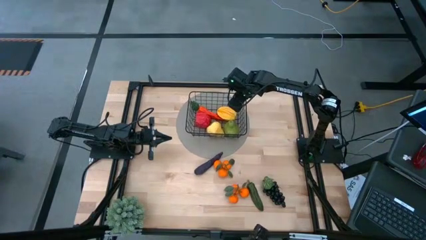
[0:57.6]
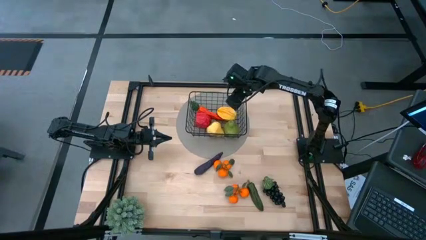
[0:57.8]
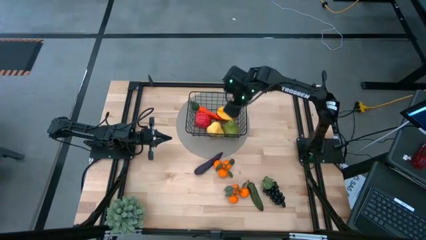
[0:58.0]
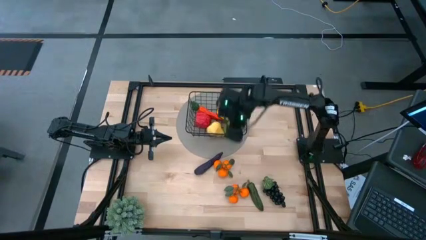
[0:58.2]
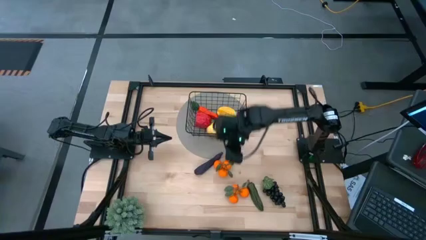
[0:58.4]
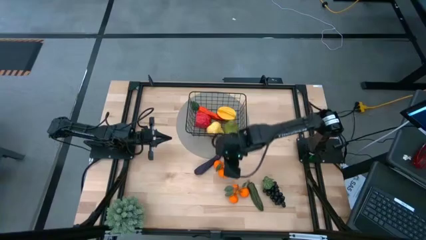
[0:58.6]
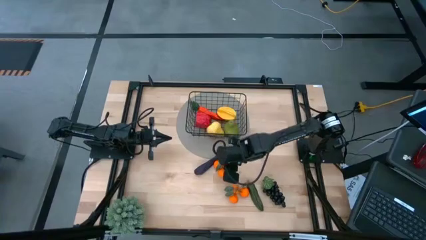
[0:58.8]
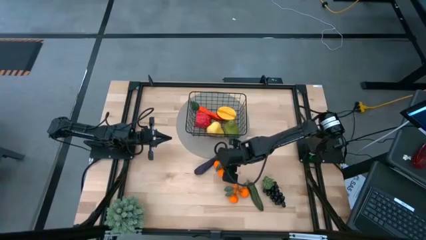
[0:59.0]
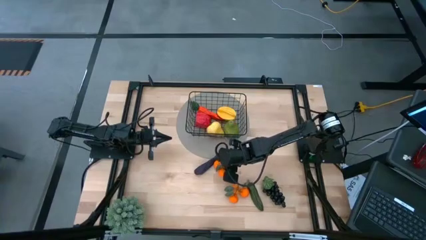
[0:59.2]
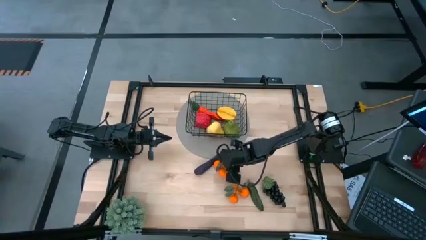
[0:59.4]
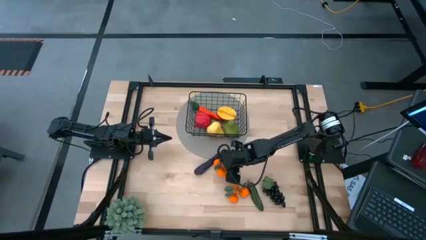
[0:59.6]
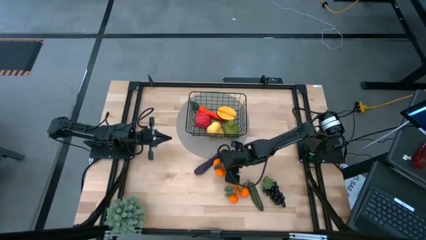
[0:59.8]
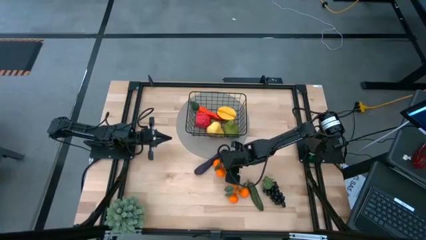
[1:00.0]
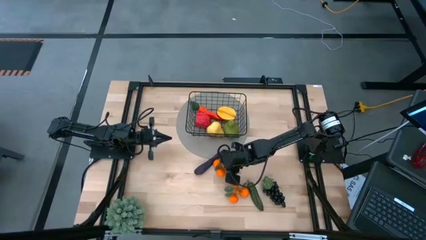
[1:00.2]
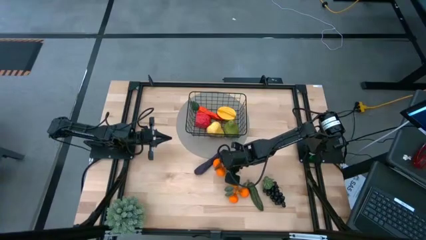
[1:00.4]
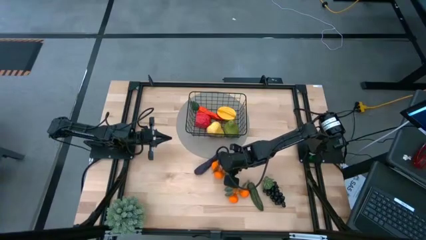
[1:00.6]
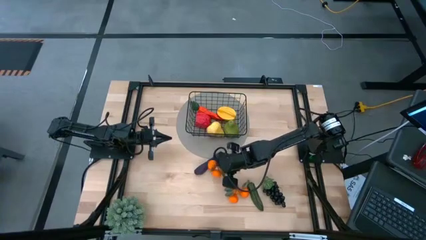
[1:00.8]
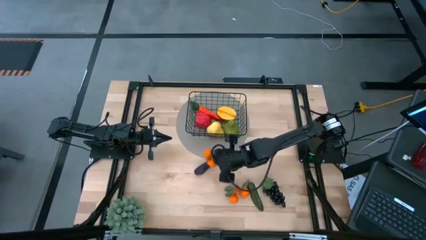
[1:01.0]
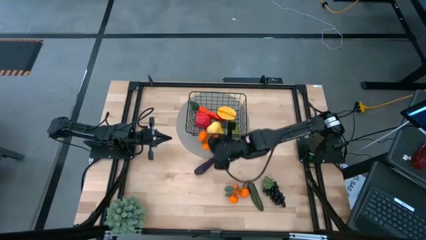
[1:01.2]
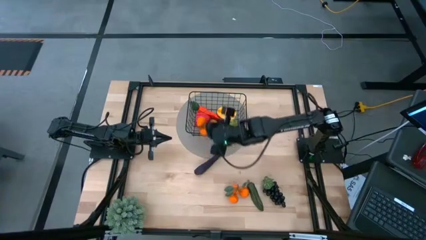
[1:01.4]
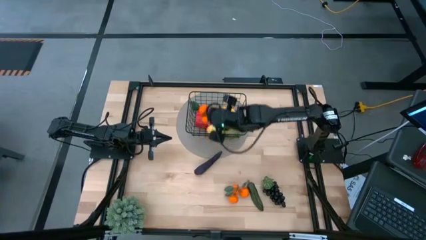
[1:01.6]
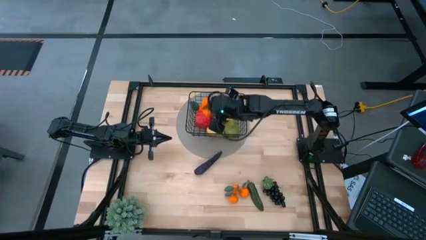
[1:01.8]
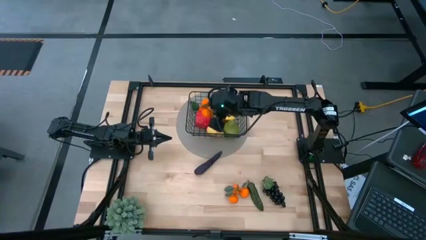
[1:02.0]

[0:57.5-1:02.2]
Task: Build produce basket
Put the top orange tangerines into the black wire basket

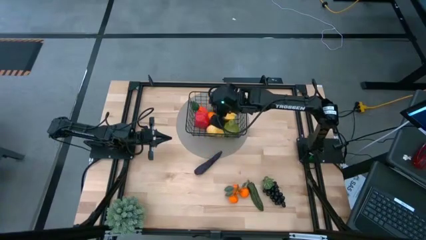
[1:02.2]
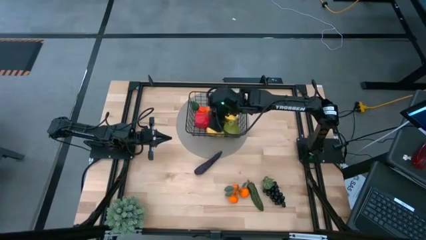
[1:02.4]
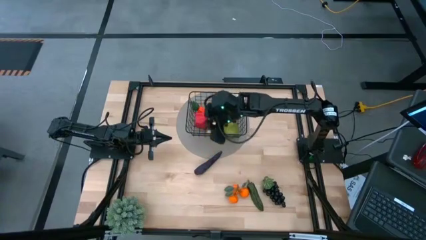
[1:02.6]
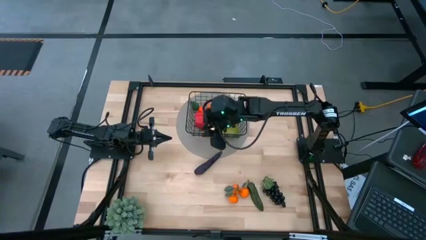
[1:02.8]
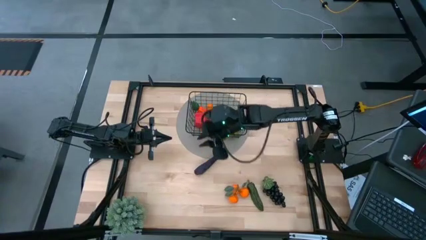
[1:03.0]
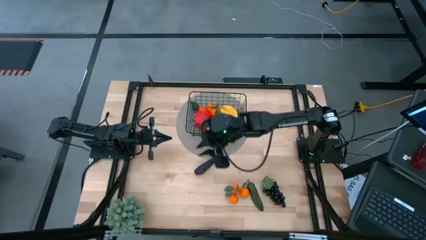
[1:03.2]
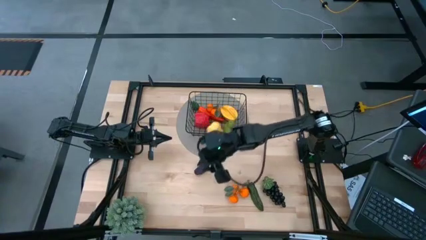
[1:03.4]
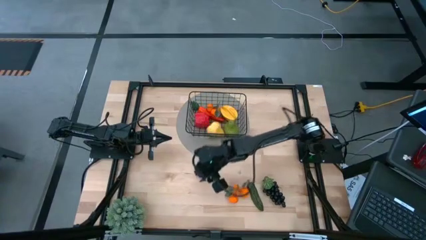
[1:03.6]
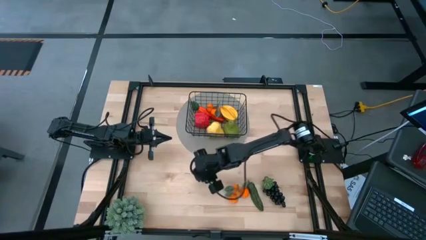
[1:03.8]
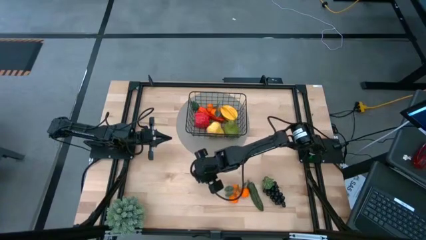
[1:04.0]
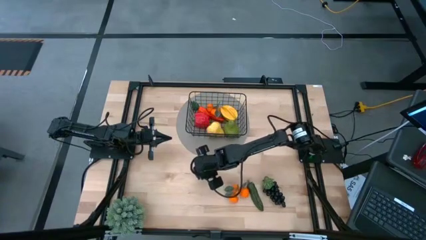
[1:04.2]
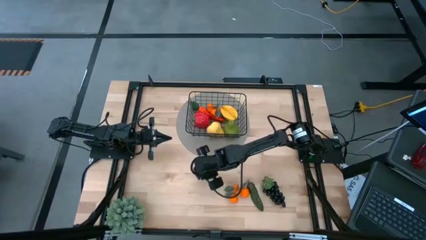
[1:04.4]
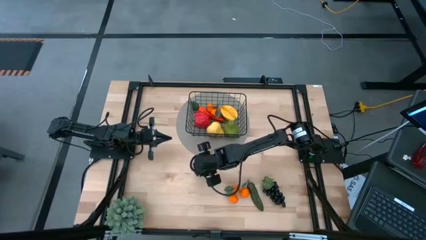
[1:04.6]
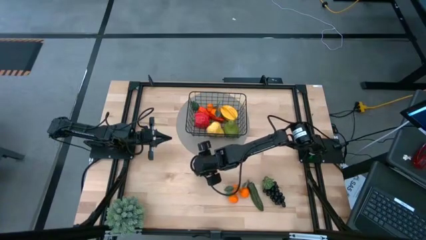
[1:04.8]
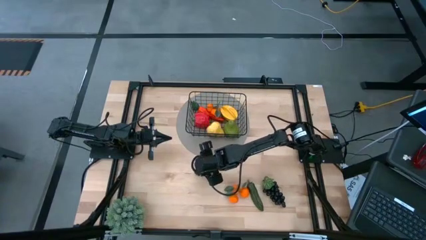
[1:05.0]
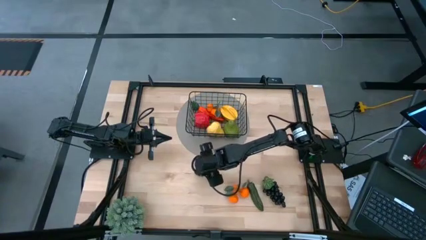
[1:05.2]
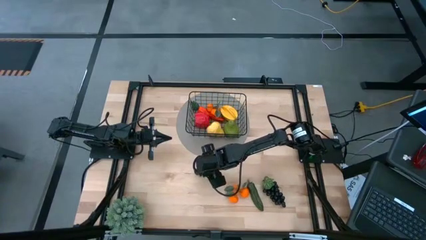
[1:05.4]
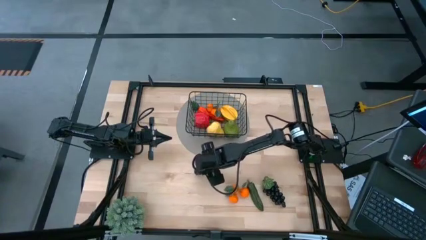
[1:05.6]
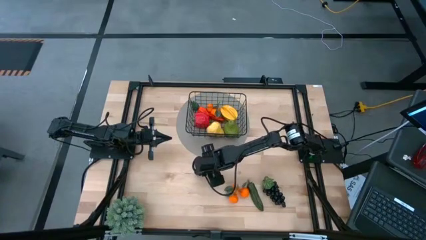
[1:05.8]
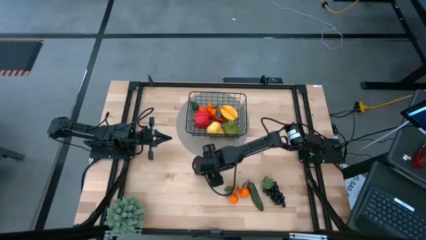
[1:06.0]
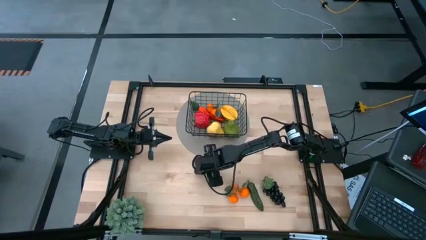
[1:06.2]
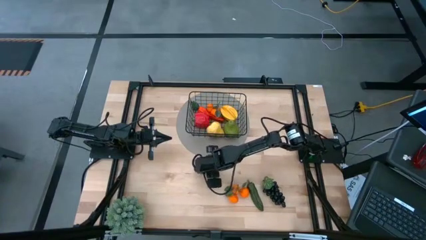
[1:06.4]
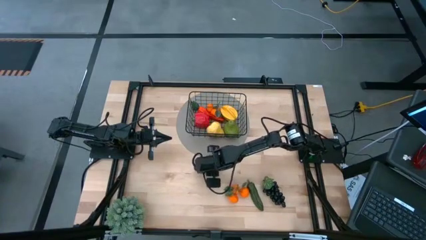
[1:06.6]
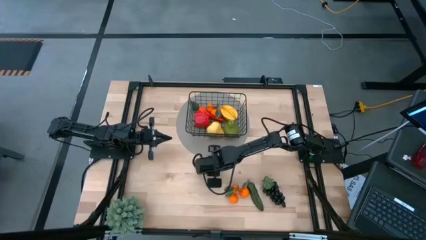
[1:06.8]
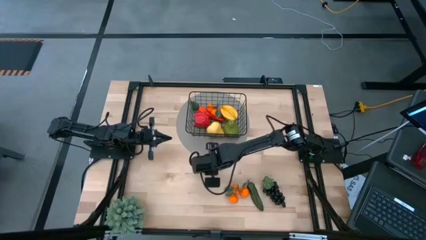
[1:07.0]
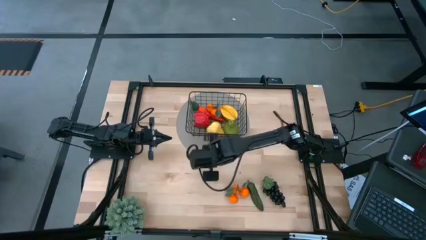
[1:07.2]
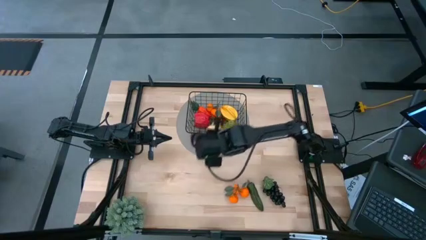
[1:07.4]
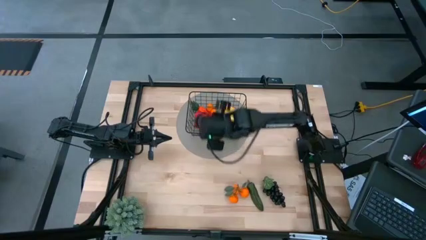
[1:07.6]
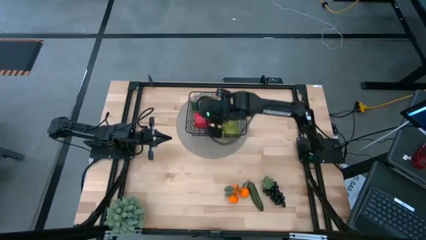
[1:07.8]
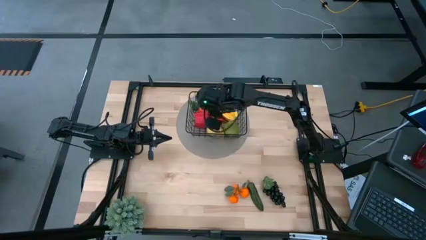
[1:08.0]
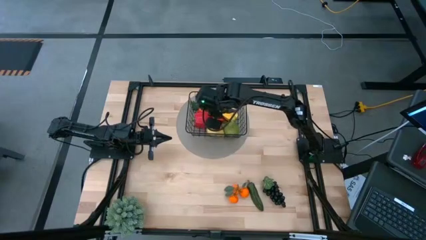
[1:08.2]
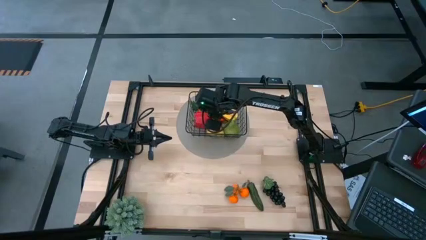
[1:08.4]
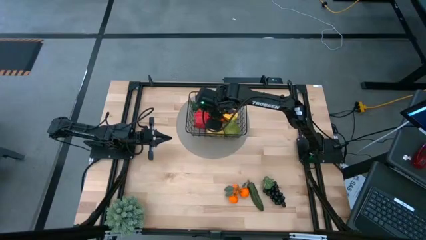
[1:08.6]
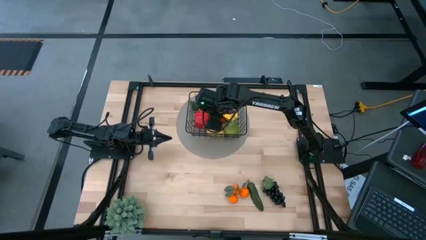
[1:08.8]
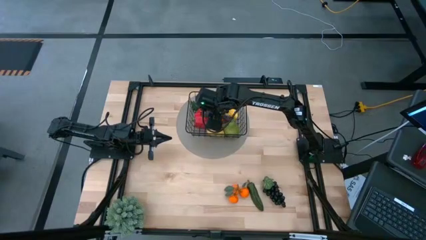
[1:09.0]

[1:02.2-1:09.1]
Put the purple eggplant into the black wire basket

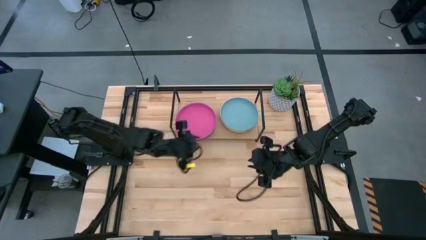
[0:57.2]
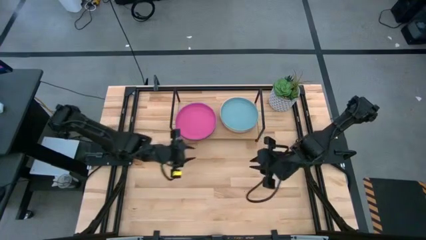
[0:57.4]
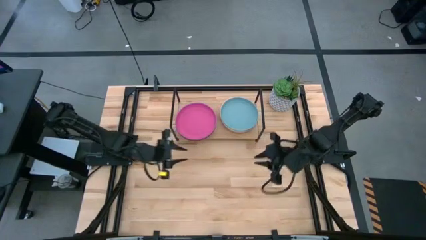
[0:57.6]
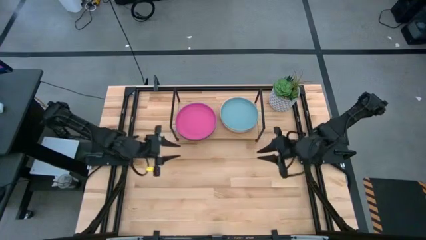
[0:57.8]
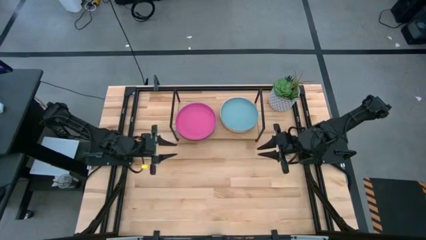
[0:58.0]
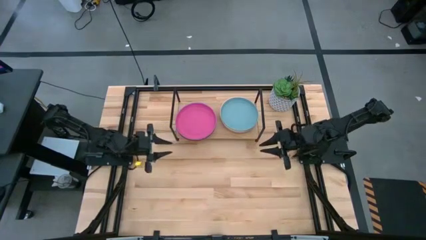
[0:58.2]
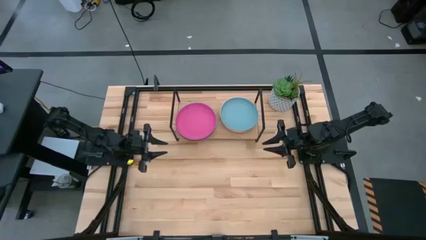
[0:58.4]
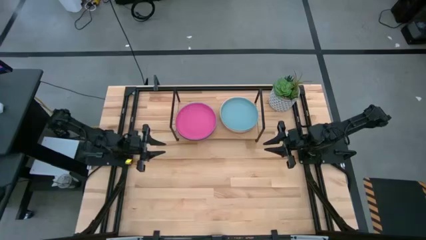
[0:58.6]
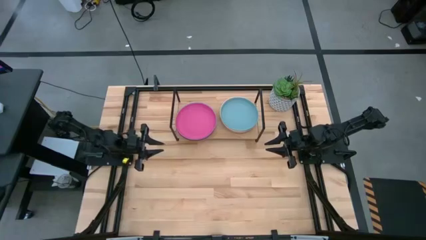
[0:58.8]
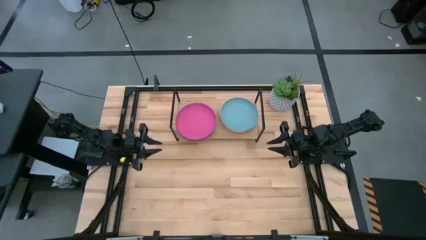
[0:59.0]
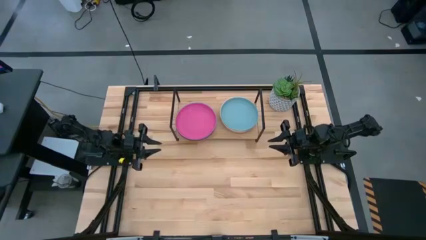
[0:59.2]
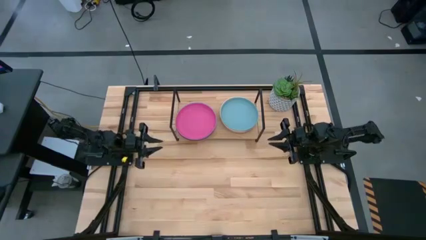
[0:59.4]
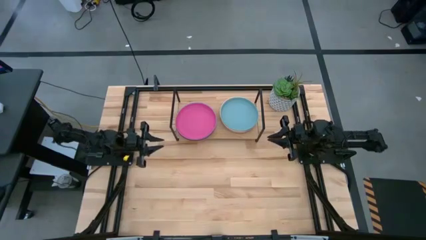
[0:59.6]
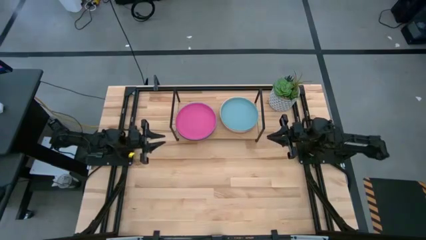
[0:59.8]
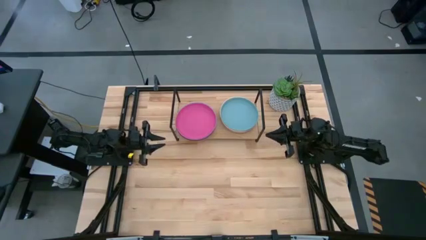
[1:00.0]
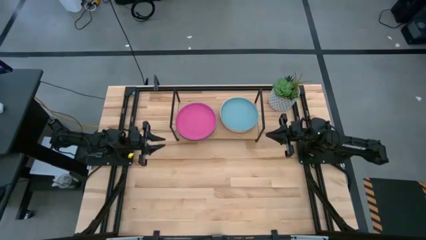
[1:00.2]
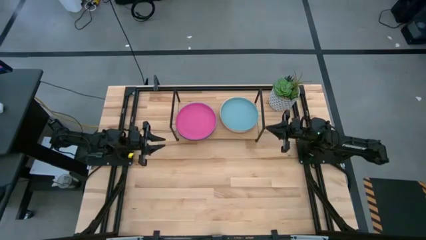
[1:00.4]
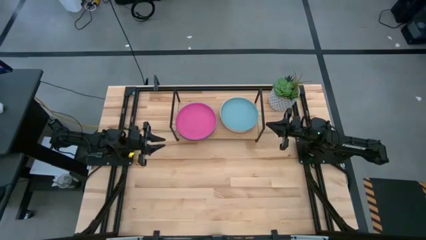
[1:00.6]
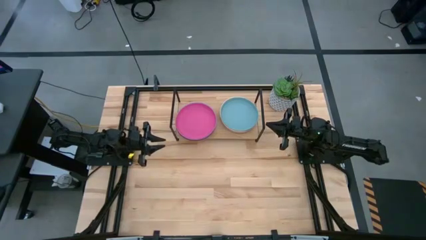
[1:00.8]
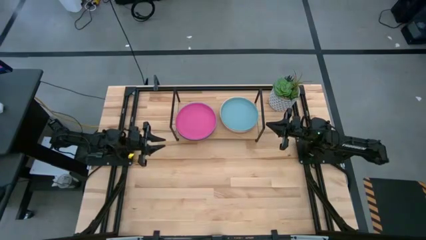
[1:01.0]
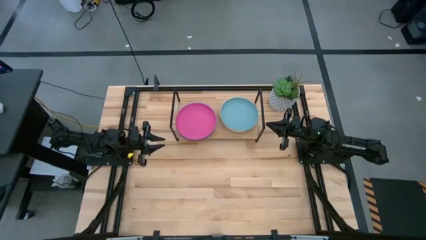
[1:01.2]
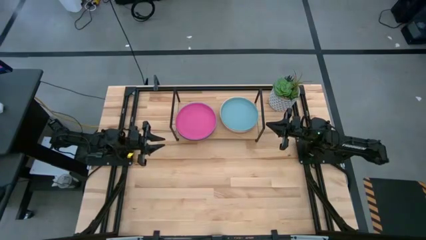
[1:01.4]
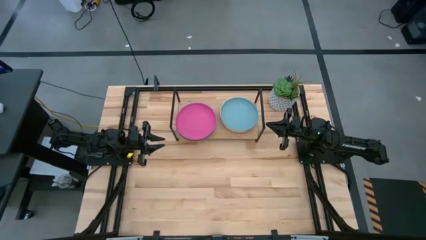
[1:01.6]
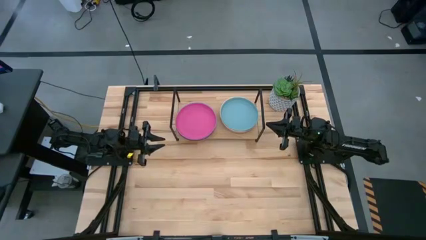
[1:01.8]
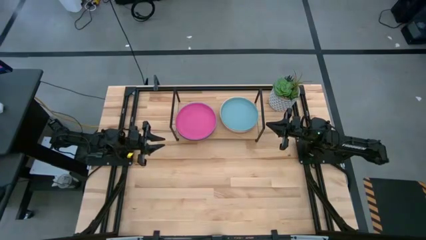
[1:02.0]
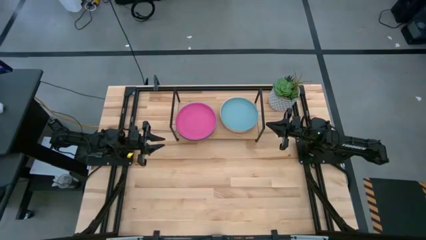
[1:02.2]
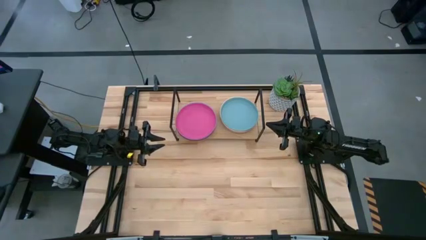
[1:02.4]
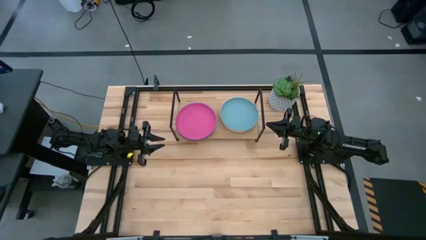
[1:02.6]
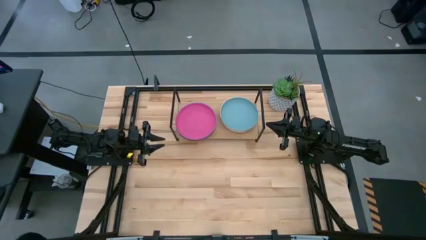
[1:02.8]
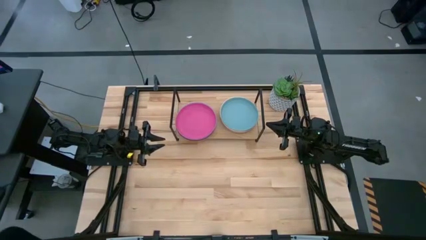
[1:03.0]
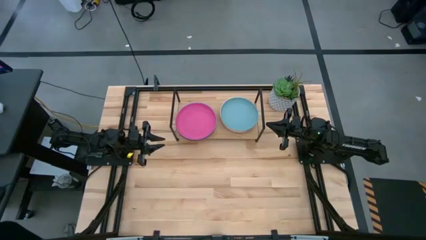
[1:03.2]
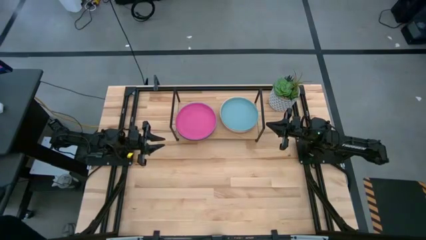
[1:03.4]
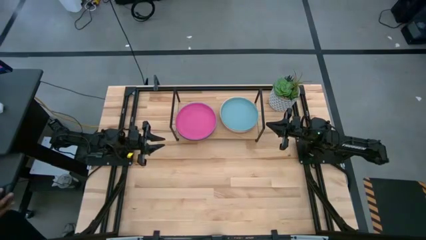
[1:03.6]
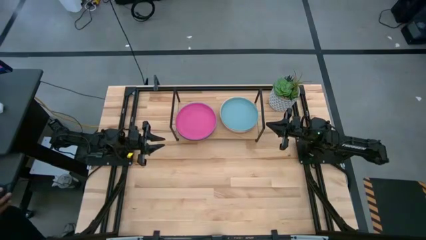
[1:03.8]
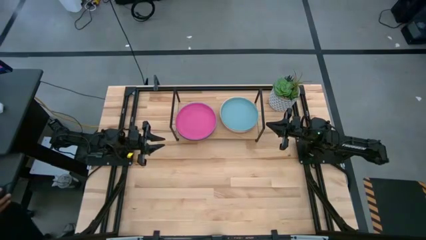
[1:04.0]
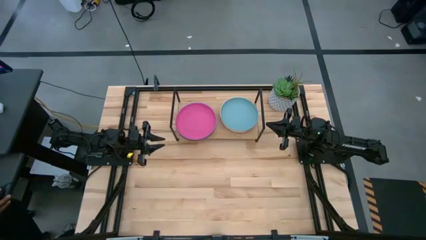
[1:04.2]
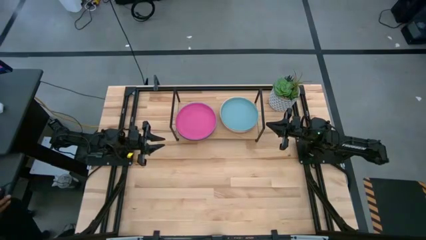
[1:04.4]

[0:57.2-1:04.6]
Task: Place and stack plates onto a shelf
Return to Home Position
